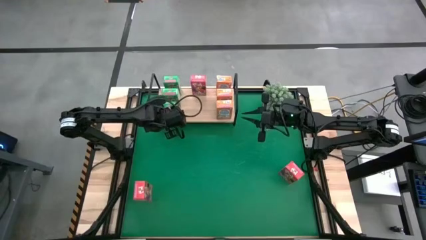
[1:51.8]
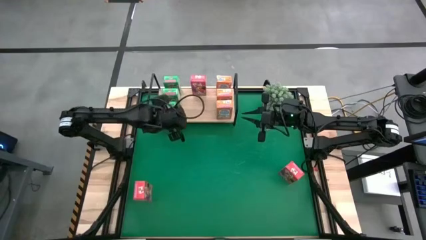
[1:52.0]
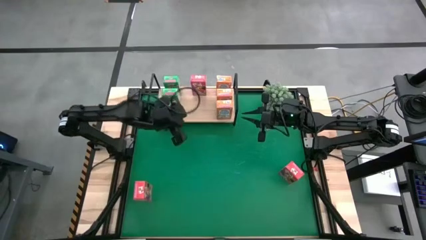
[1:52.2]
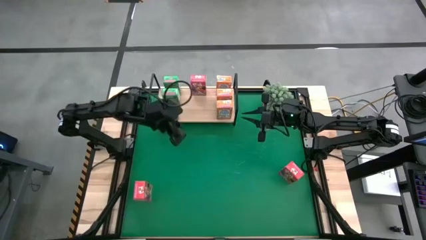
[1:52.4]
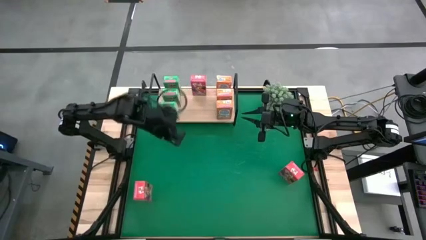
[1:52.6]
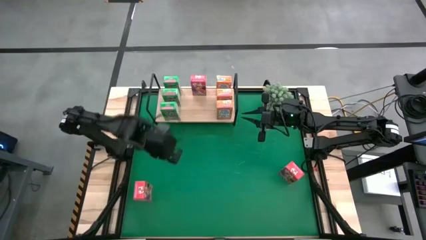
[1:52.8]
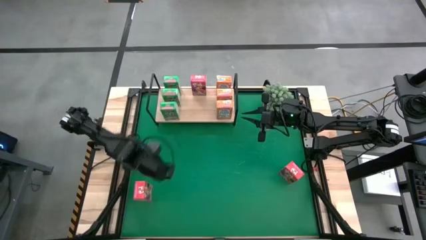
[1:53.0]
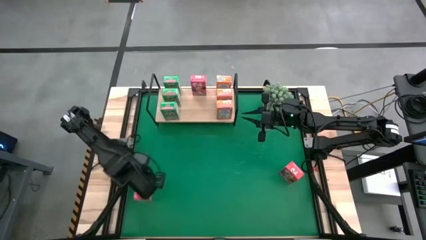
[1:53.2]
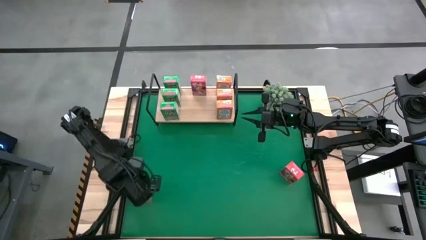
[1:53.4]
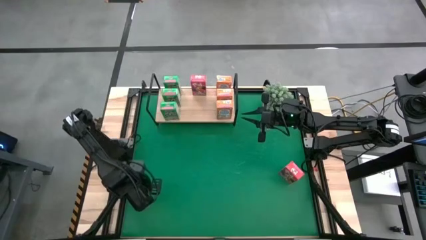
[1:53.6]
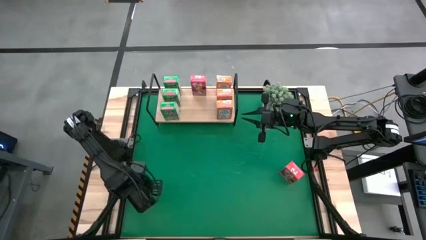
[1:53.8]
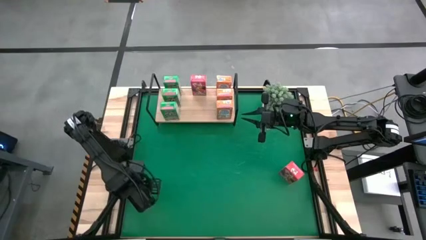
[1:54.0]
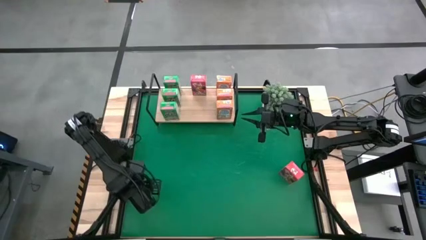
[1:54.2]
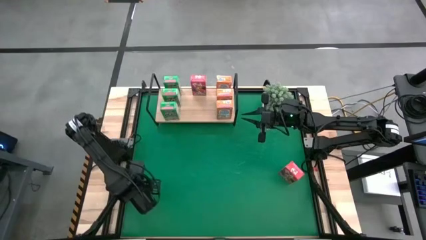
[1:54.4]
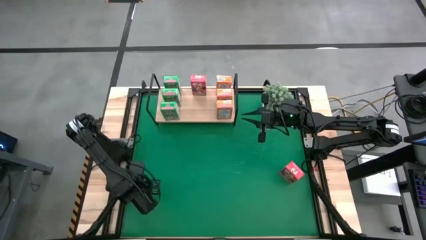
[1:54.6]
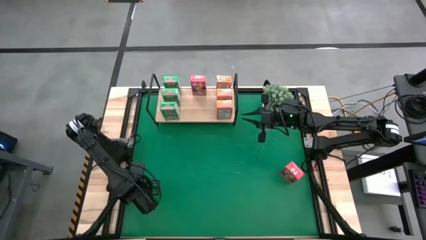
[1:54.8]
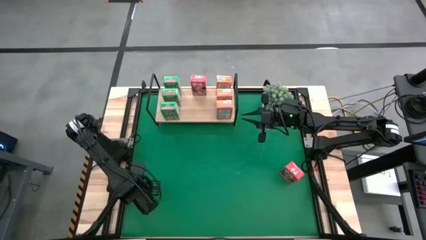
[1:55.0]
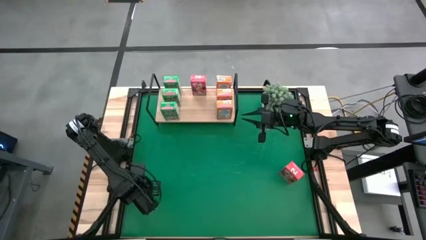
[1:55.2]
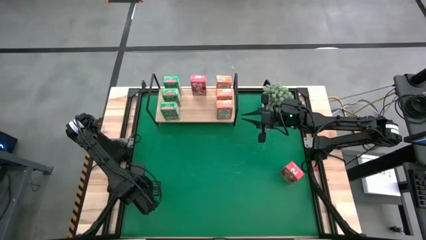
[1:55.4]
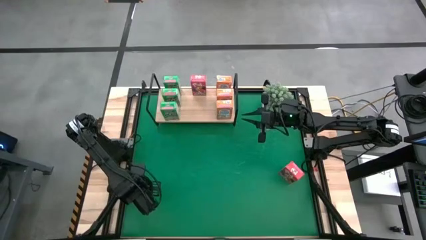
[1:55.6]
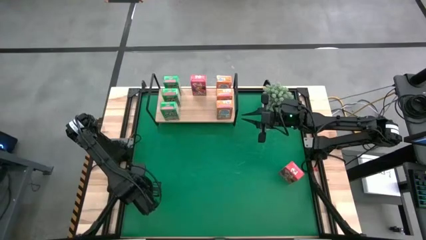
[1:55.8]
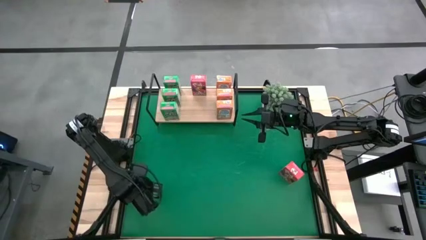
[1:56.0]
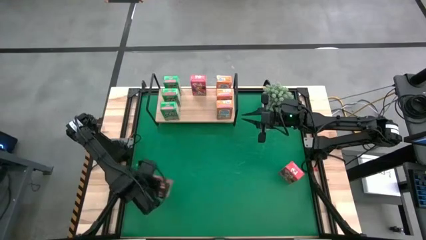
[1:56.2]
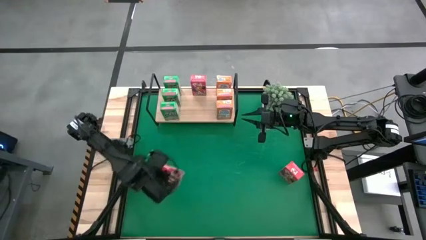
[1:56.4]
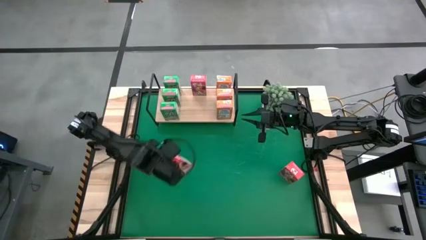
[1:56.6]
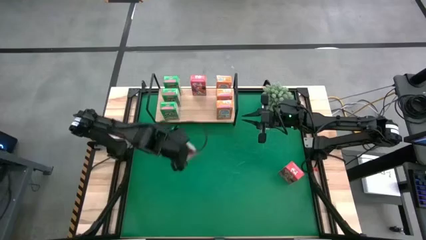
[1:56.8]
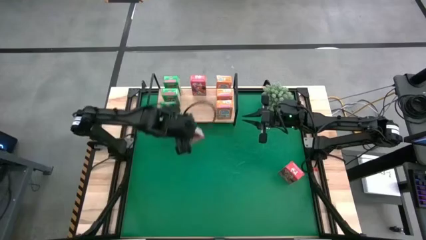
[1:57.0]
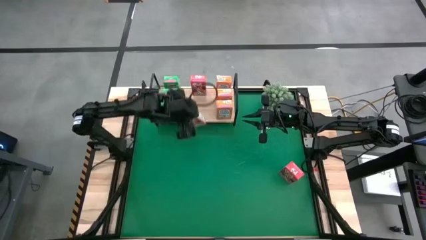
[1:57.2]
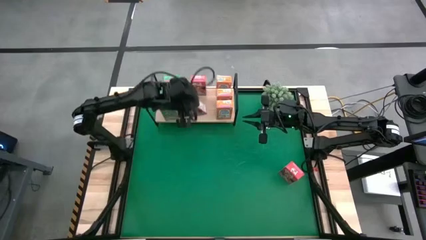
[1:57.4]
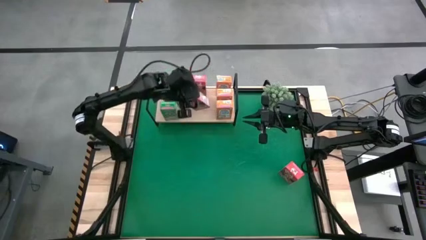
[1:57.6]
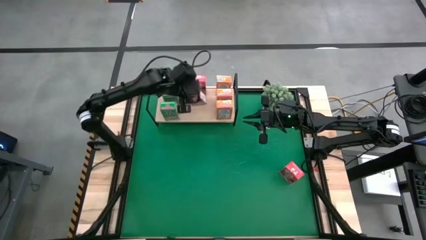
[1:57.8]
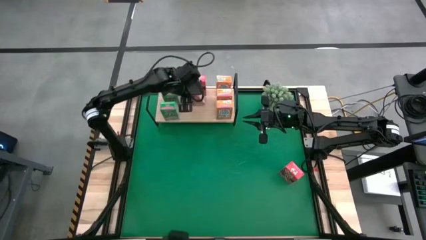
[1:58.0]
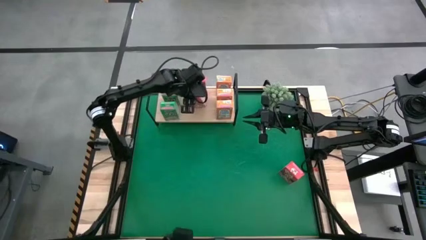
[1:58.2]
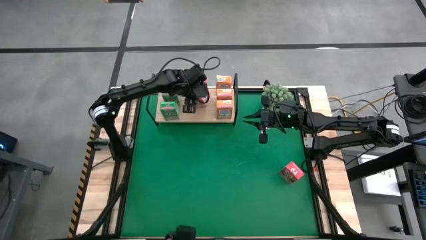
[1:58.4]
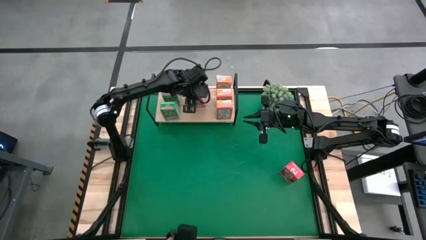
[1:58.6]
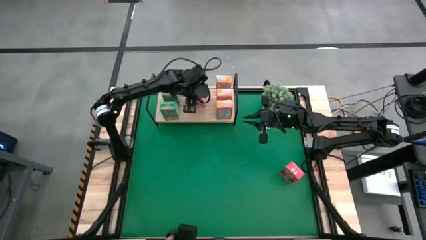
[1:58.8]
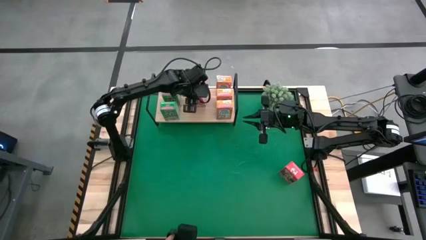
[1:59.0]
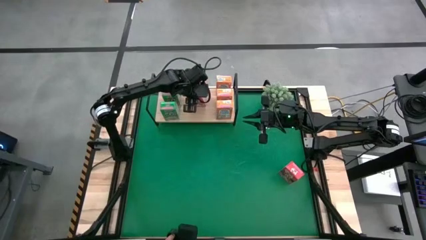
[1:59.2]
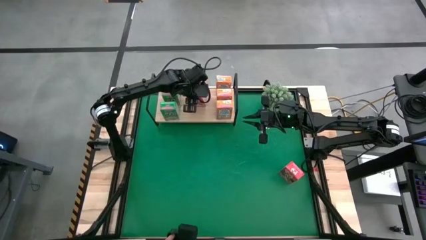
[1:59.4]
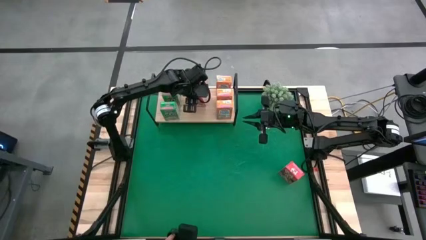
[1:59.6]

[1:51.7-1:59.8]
Task: Stack cereal on shelf
Put the left red cereal box aligned with the other red cereal box on the shelf

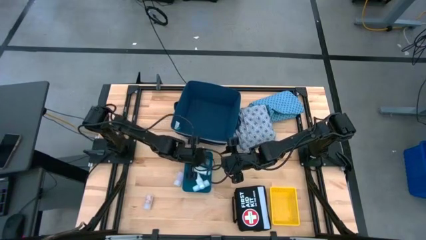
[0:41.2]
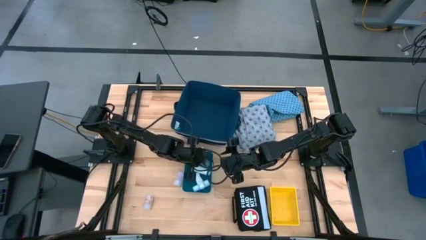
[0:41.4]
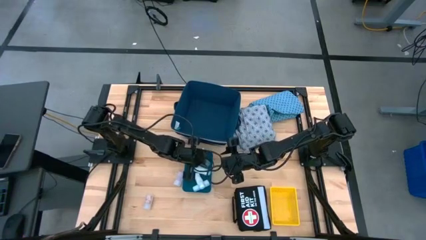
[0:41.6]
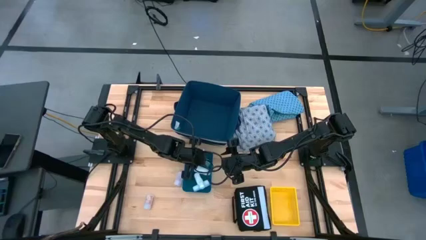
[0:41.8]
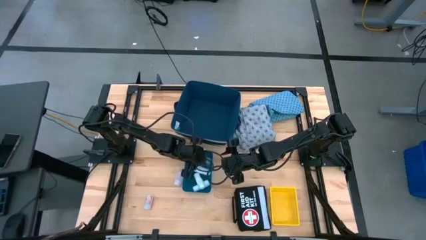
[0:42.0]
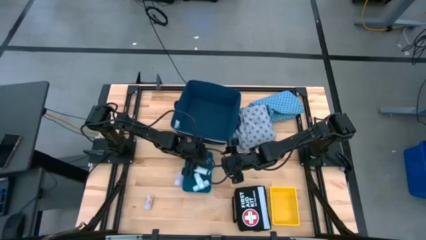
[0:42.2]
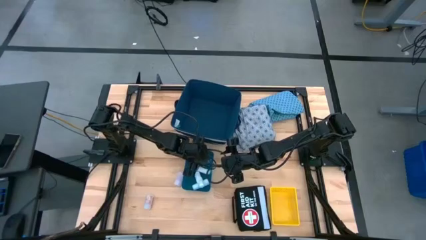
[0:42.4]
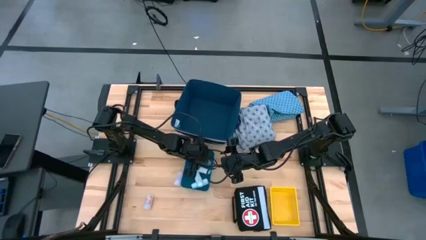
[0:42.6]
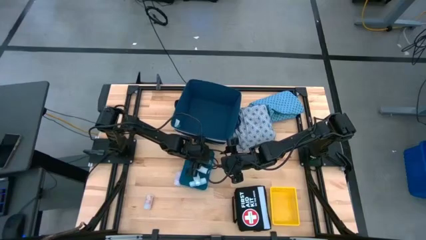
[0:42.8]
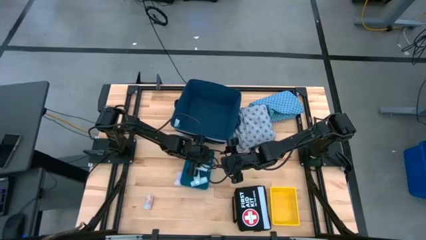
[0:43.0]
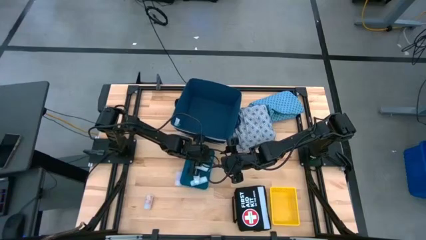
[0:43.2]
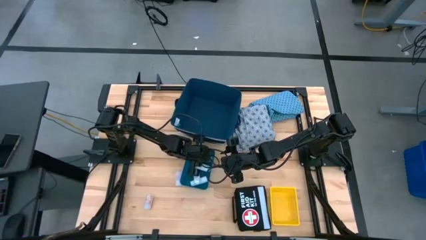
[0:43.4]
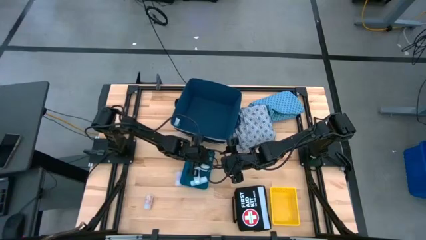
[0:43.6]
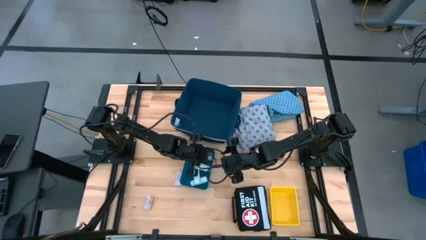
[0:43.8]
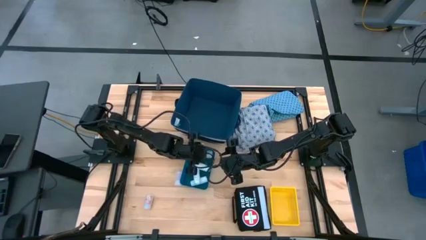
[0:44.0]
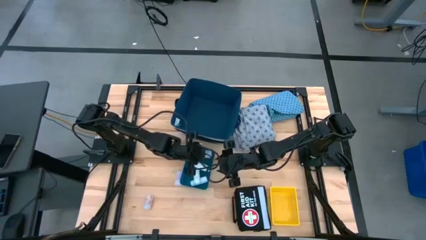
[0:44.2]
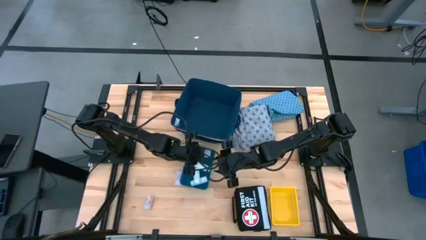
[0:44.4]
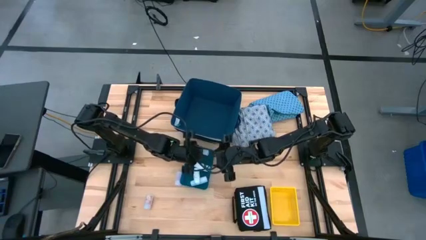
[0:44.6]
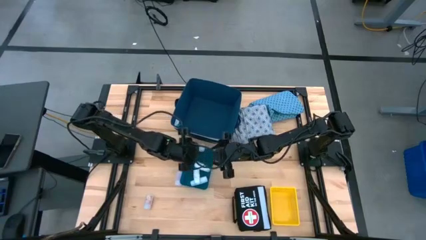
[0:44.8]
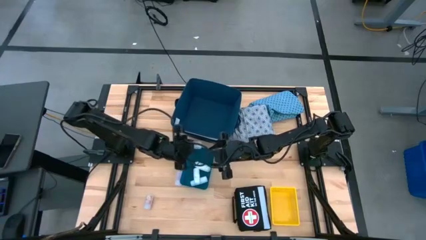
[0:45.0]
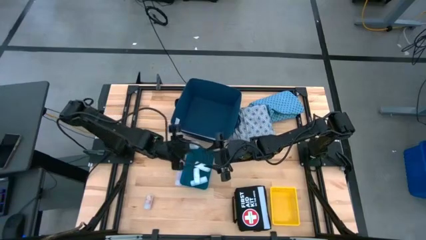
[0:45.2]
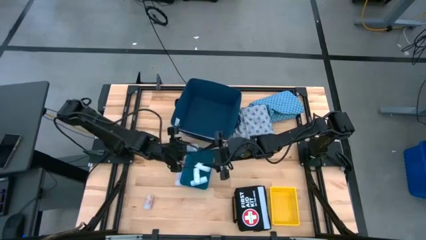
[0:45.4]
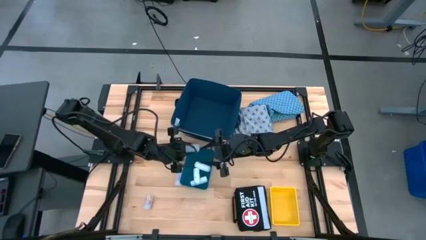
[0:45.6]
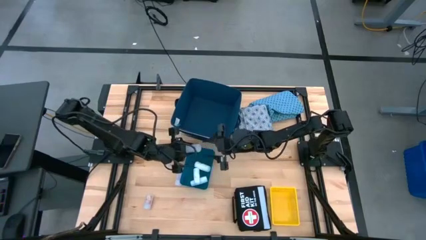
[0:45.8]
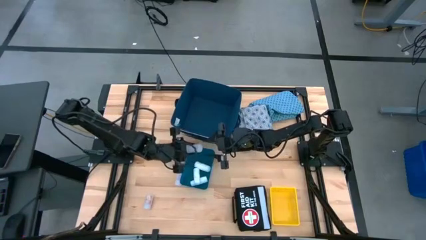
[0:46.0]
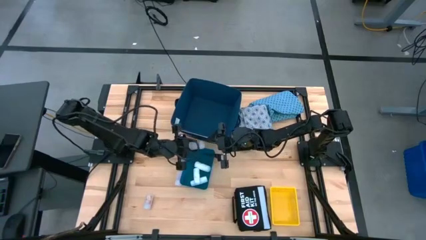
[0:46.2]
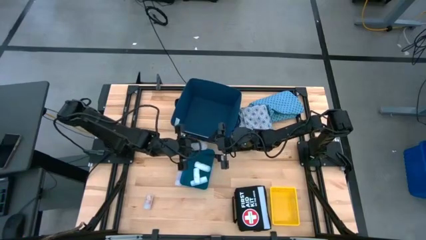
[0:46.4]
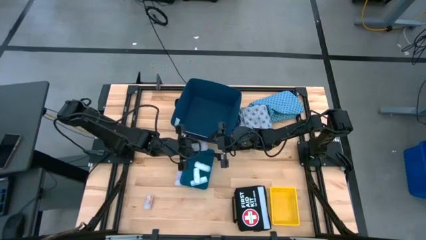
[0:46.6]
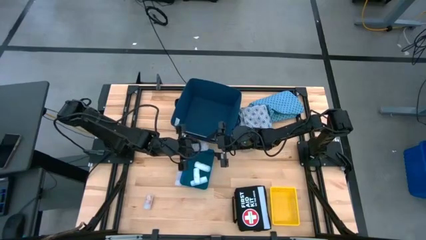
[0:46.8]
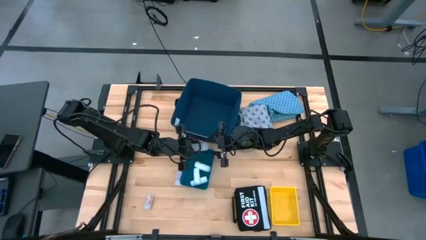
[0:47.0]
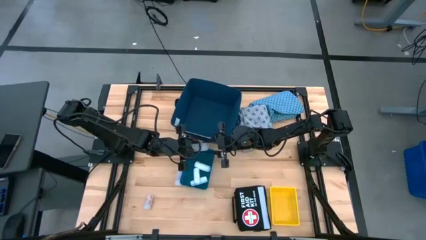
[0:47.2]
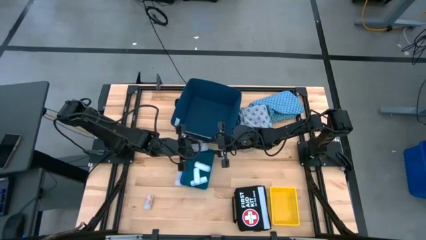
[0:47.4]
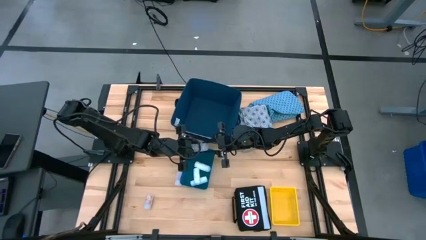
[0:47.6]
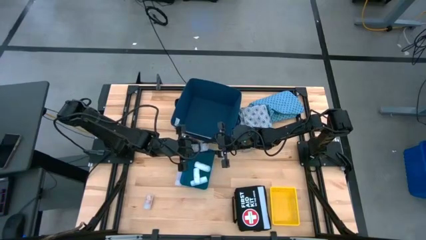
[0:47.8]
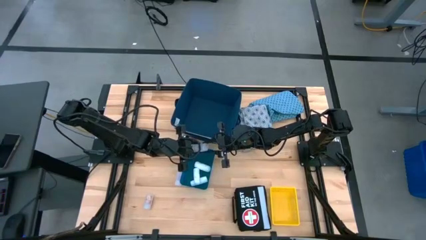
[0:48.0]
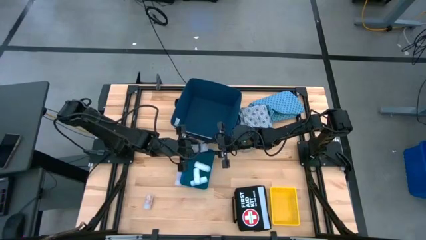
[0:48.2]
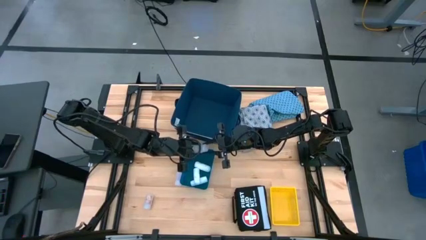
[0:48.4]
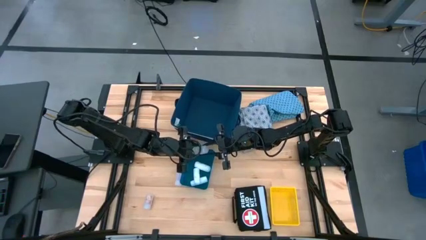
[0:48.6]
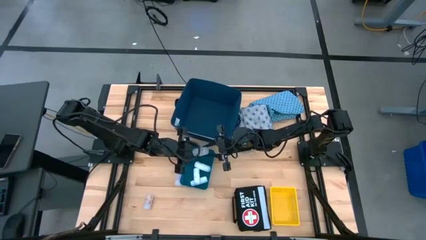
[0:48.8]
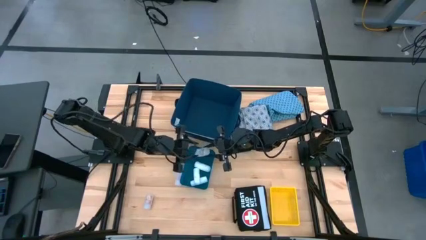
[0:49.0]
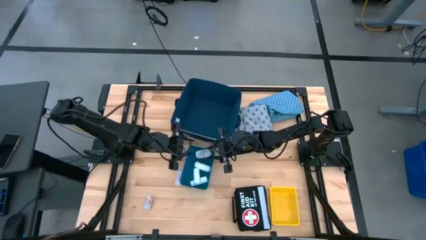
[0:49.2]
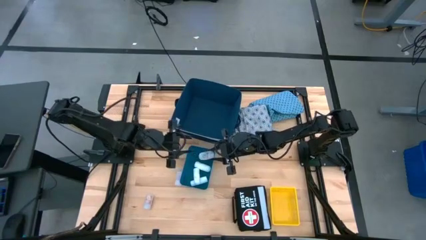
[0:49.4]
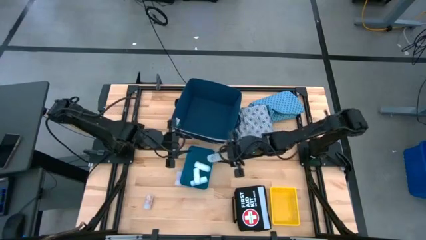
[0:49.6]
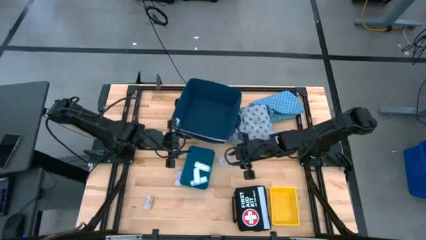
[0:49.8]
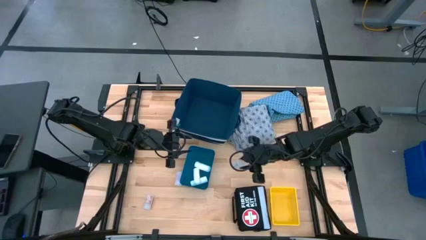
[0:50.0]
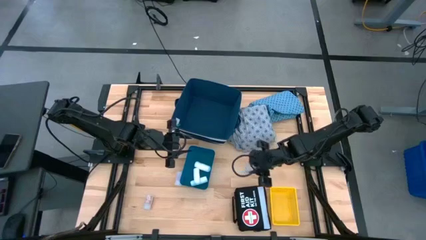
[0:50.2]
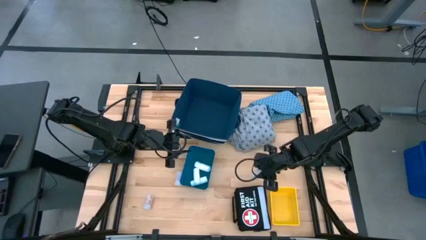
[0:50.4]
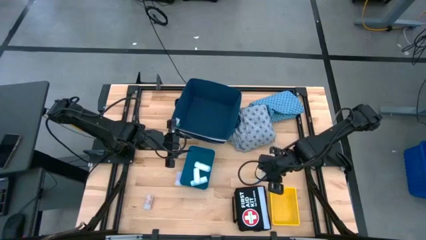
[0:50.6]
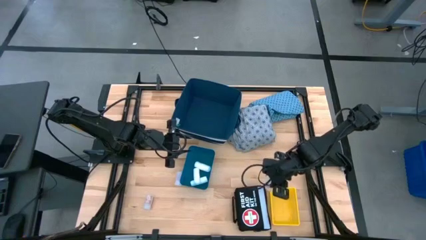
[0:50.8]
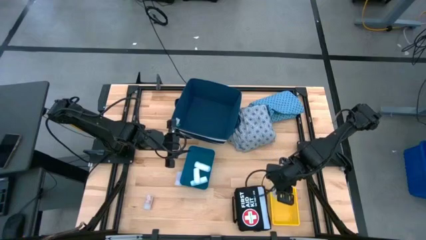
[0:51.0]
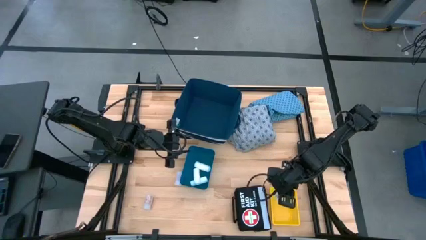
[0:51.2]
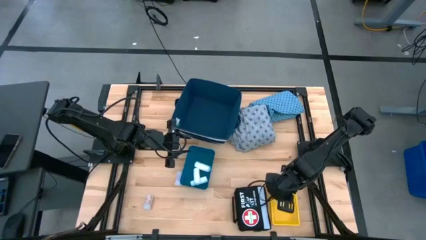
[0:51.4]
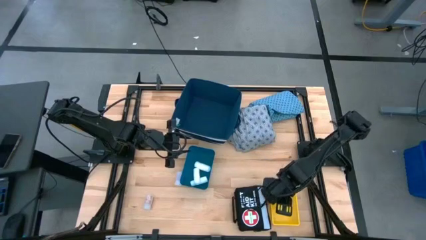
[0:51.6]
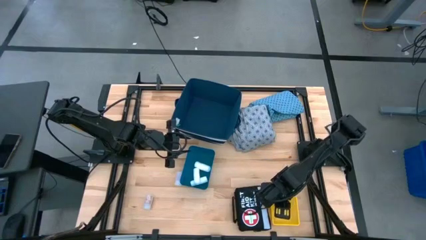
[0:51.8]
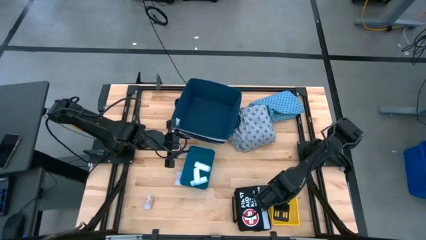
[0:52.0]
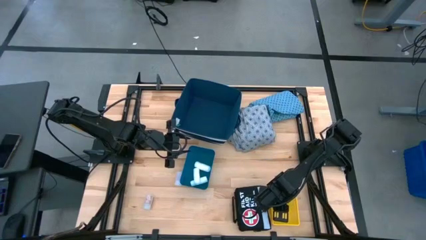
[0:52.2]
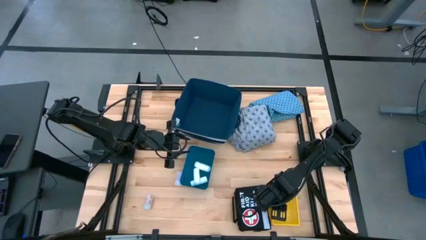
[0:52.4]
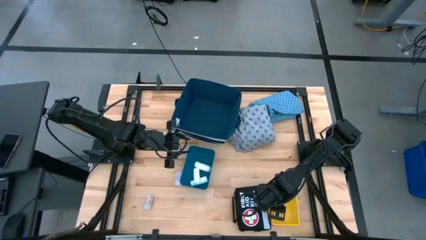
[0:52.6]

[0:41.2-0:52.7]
Task: Pick & place medical supplies in basket/bin
Put the top transparent bottle in the yellow bin
